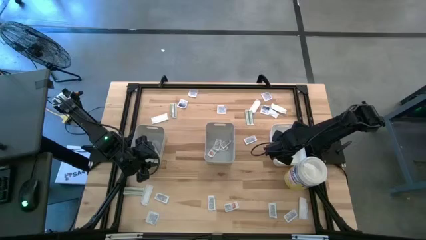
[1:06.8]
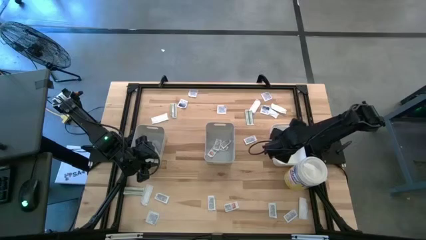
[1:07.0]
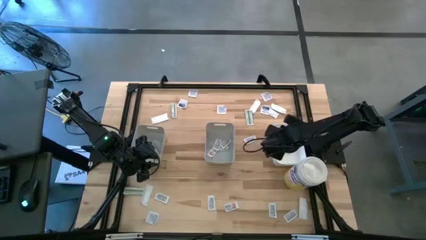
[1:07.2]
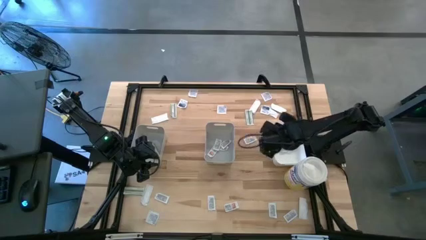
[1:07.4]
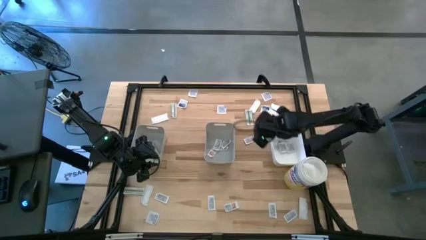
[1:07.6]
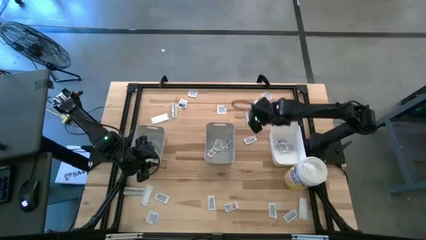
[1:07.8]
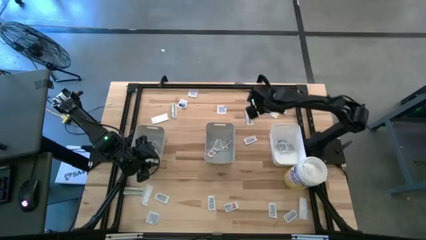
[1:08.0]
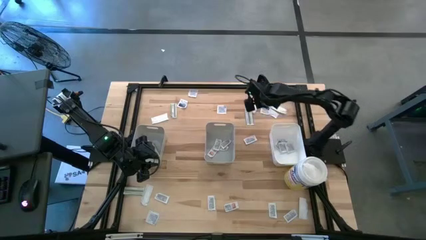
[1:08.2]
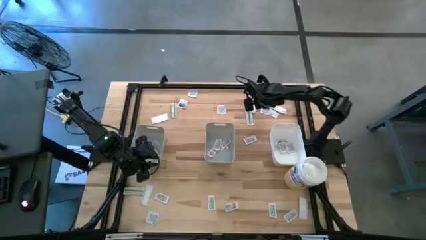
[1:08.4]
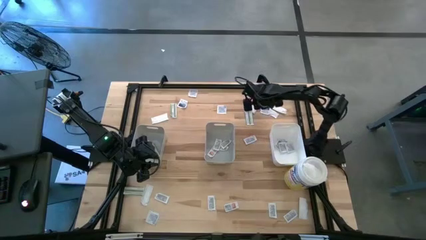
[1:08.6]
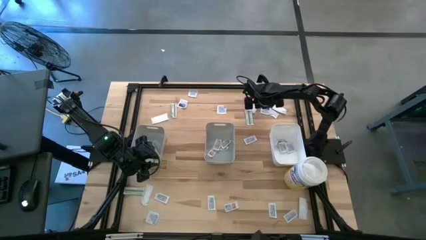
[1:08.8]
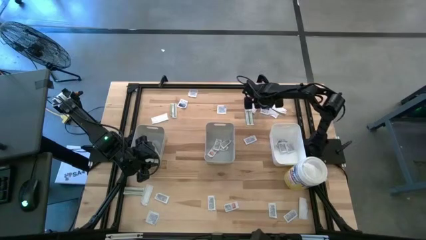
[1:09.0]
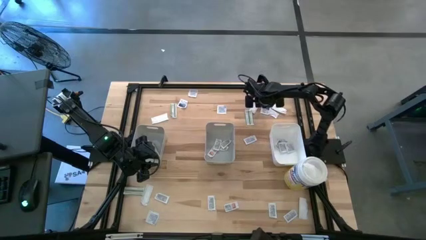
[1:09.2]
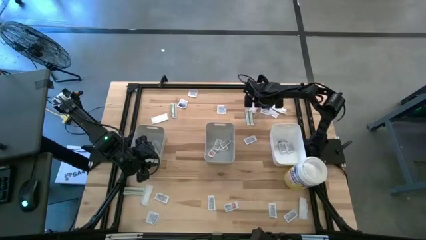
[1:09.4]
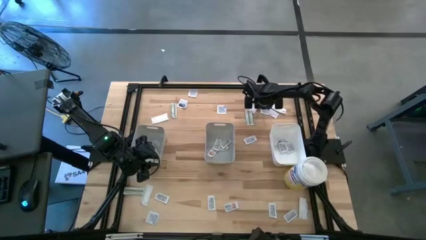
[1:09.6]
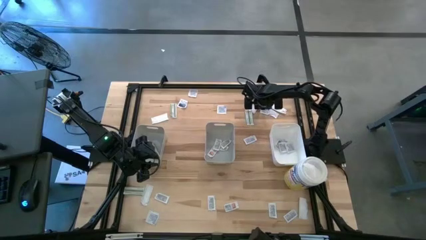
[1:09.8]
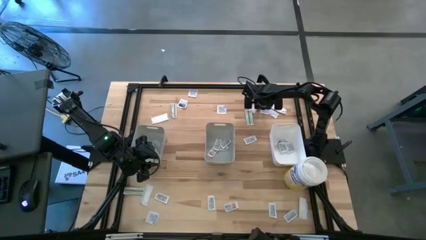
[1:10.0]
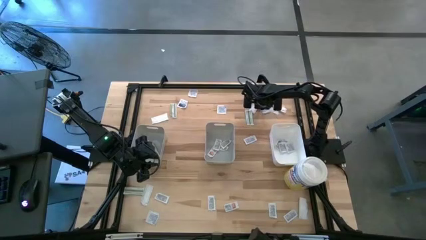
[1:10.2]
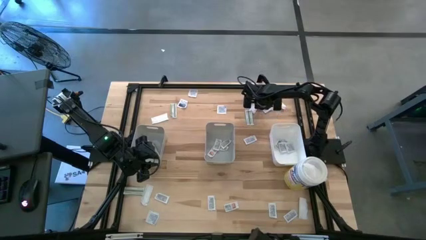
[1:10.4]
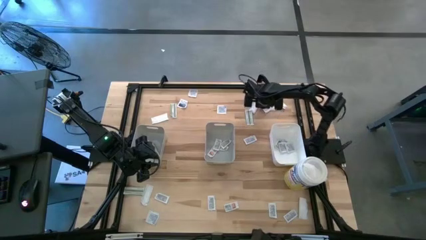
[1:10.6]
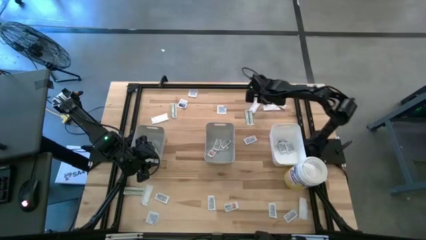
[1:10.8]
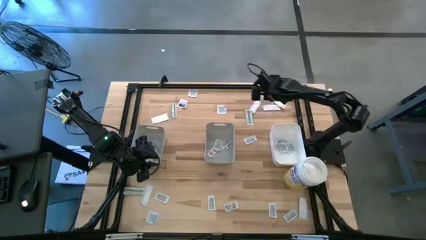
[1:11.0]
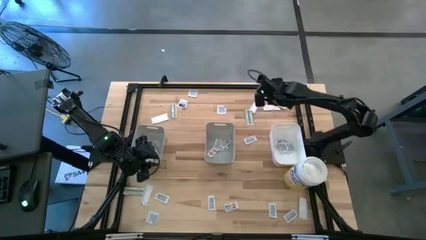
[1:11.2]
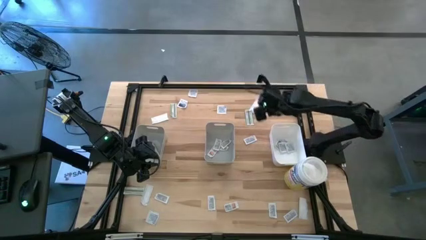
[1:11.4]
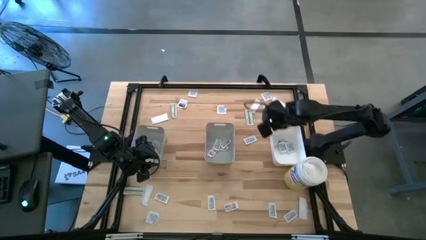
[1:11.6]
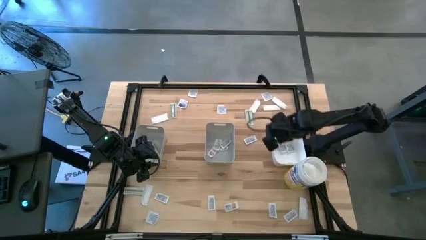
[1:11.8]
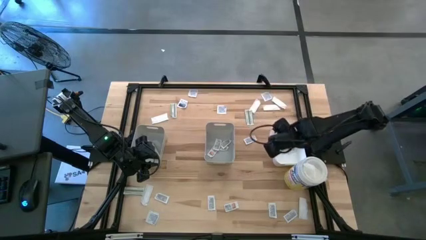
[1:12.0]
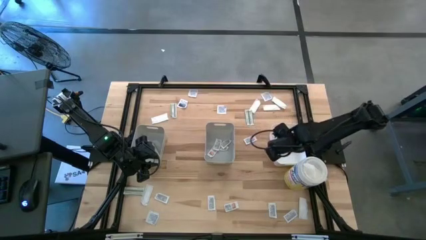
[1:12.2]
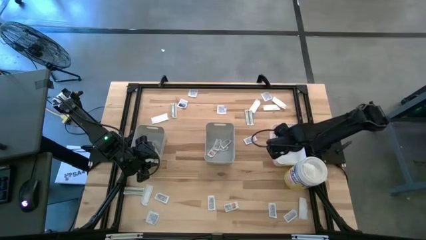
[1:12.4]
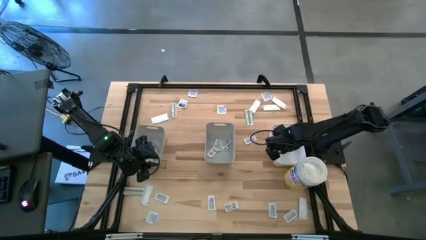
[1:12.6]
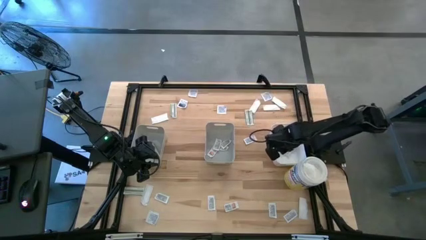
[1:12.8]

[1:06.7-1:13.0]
Task: Pick & Place First Aid Supplies
Put the alcohol pad into the white bin

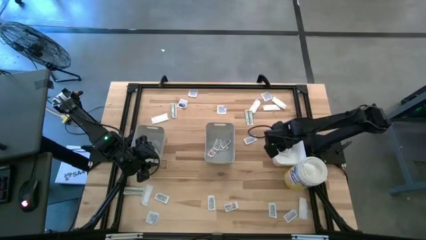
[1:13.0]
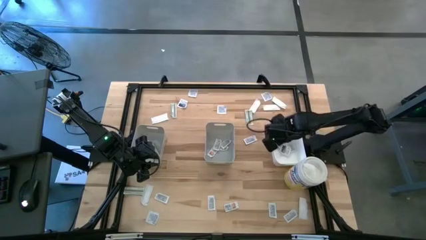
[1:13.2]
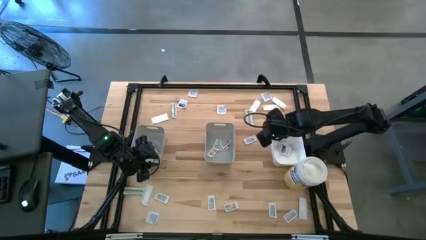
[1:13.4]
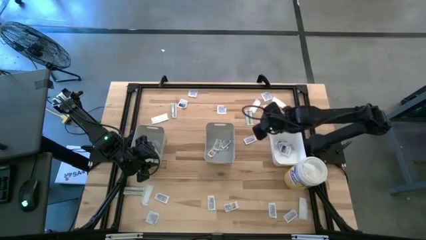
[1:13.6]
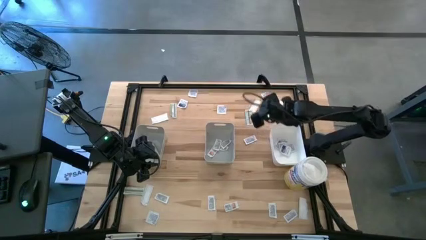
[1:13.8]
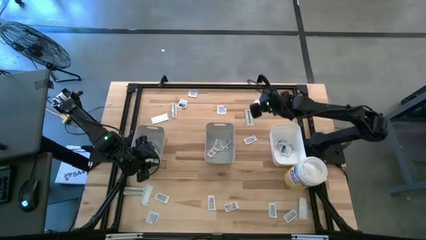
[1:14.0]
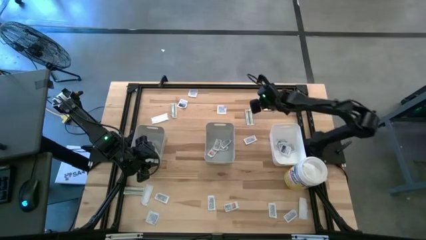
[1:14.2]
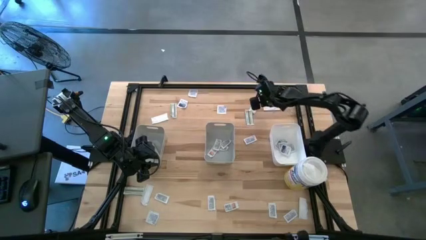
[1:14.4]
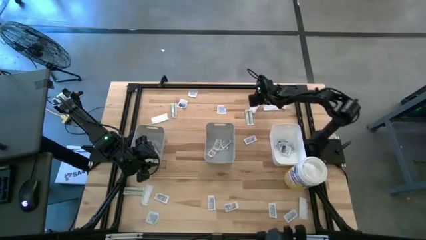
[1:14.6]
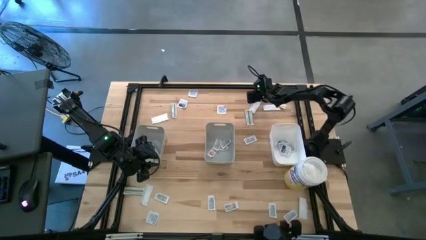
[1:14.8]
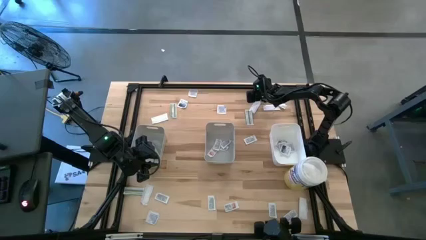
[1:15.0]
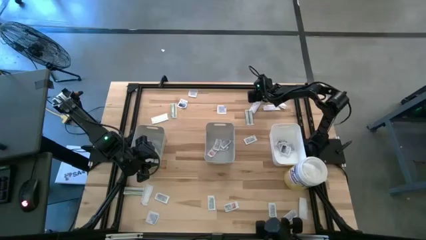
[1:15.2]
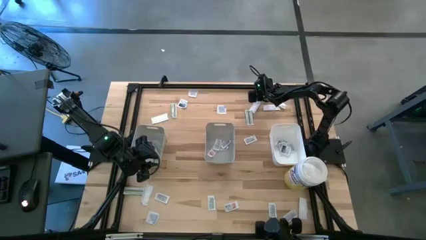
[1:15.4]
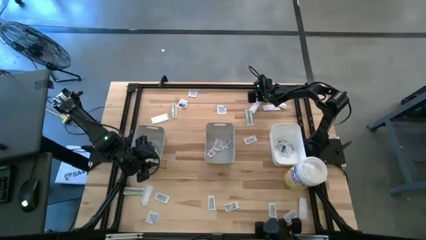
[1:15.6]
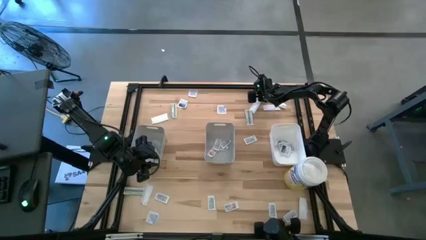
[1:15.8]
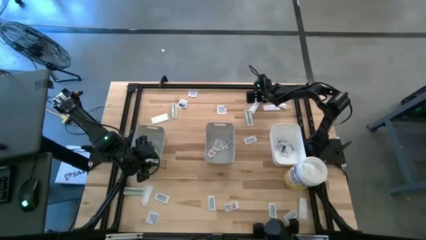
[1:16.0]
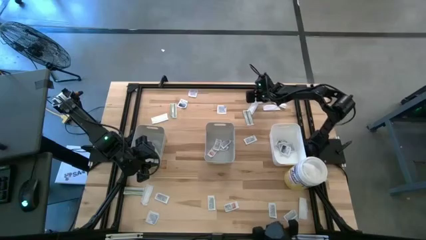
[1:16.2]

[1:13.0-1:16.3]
Put the alcohol pad into the white bin

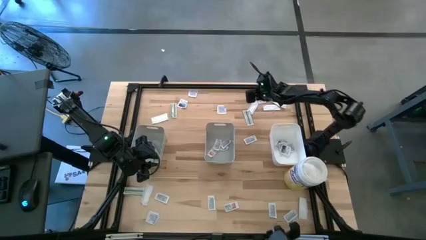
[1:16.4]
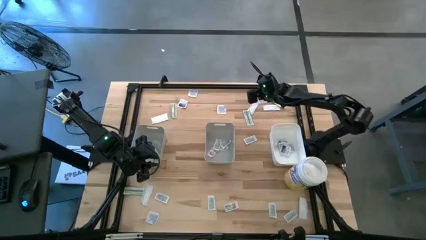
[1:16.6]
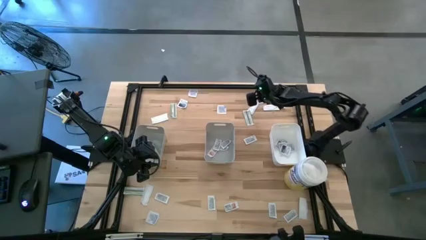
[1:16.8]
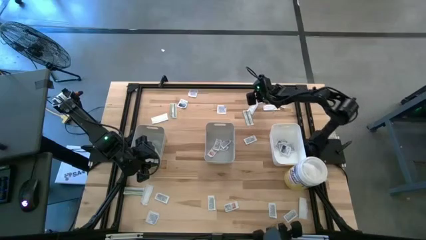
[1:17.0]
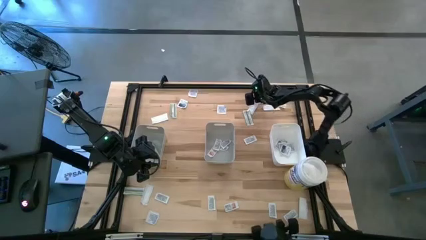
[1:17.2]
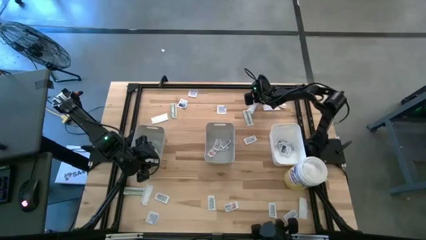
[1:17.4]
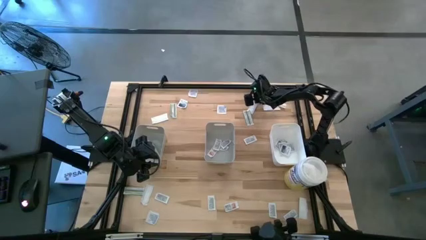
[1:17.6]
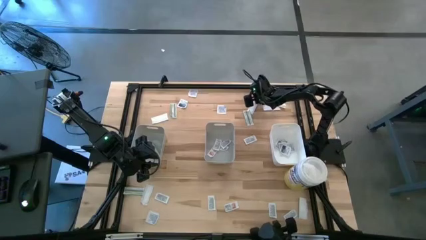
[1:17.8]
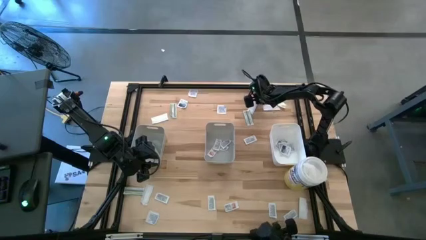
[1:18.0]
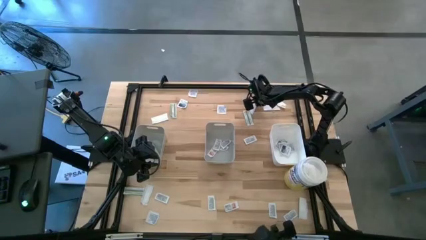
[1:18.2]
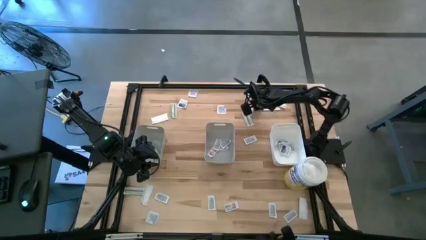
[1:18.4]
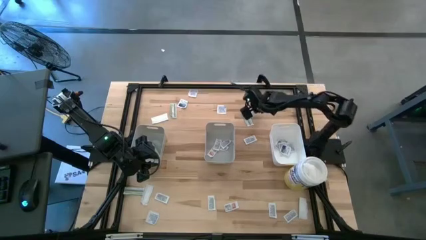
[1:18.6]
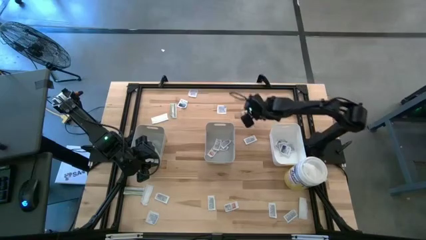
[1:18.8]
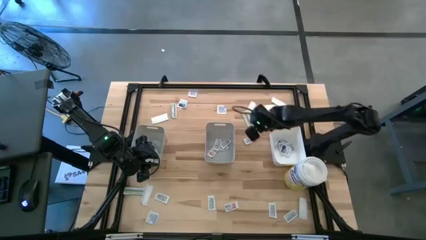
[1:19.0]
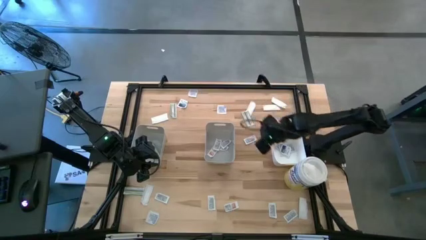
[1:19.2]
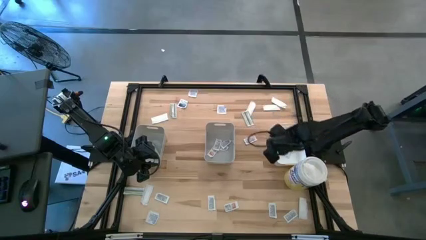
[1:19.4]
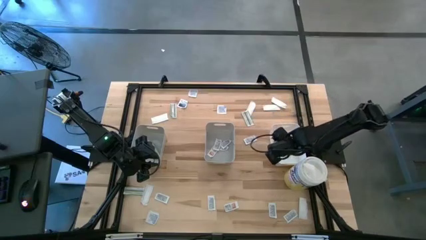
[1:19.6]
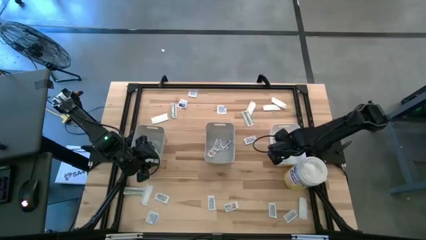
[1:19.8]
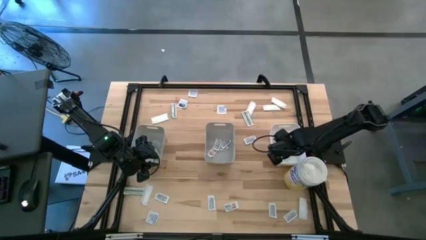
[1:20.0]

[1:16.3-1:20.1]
Put the alcohol pad into the white bin

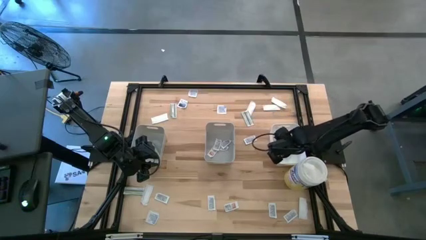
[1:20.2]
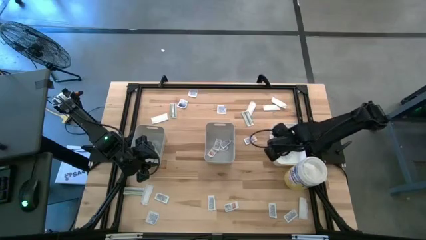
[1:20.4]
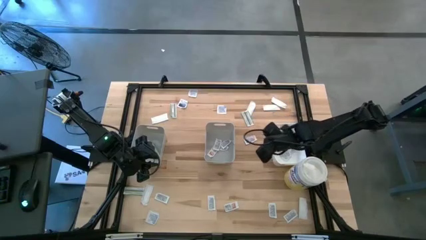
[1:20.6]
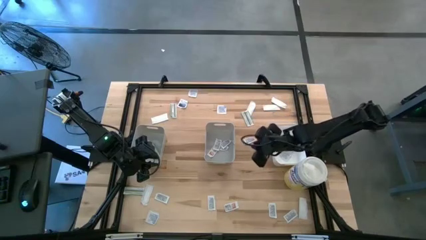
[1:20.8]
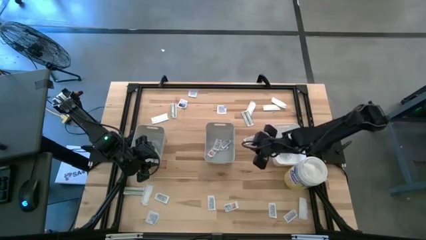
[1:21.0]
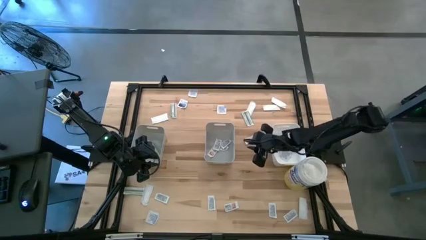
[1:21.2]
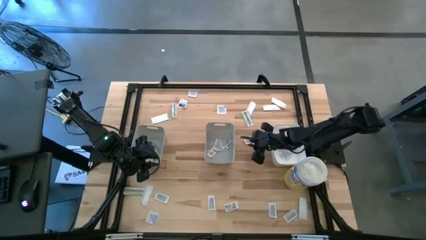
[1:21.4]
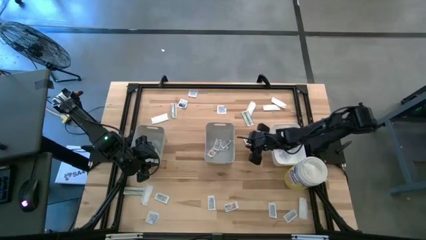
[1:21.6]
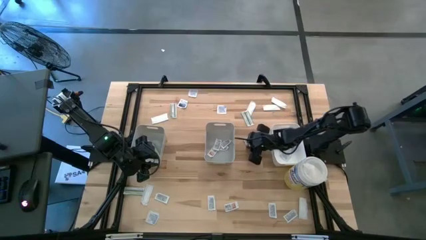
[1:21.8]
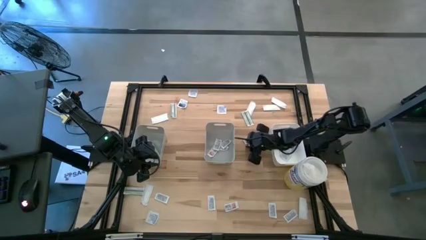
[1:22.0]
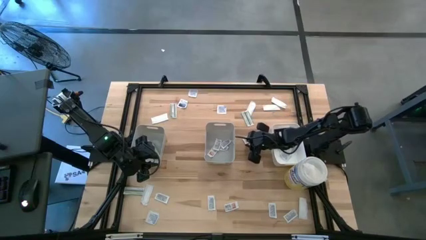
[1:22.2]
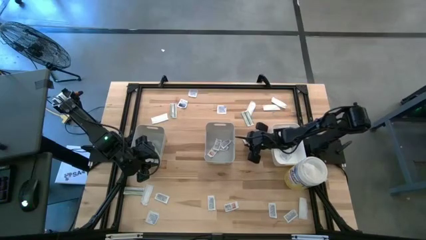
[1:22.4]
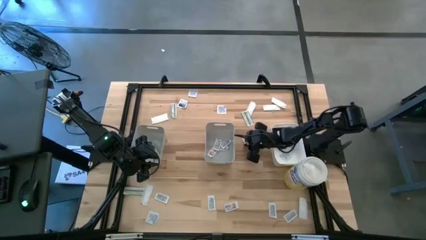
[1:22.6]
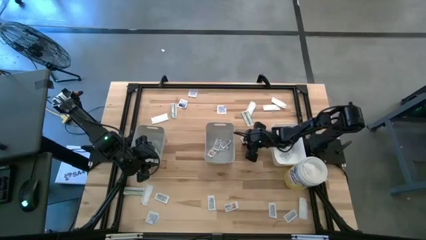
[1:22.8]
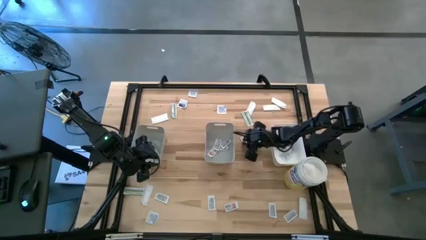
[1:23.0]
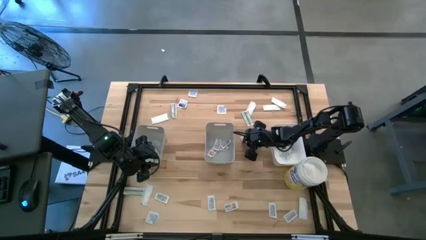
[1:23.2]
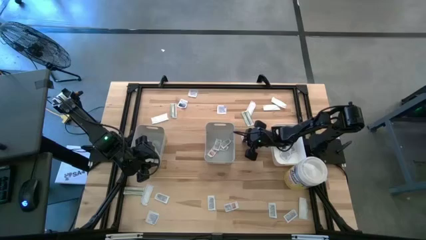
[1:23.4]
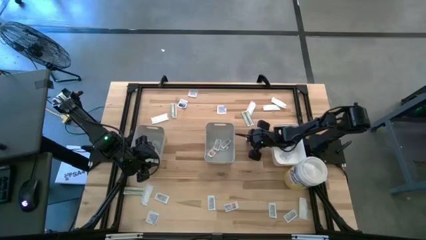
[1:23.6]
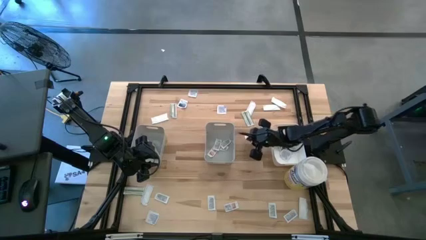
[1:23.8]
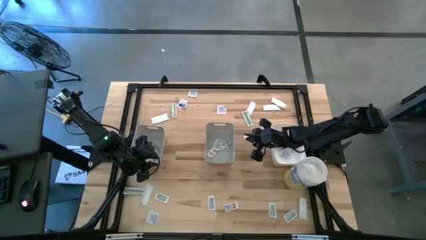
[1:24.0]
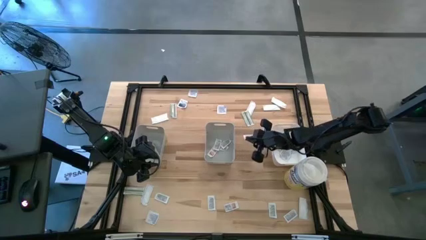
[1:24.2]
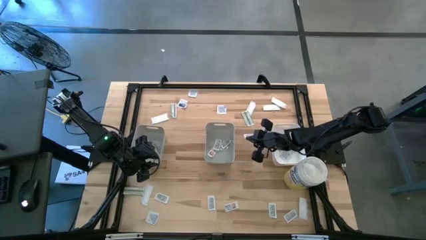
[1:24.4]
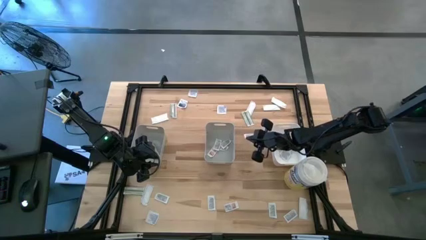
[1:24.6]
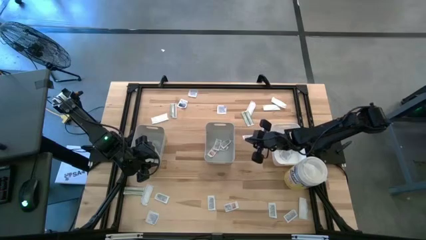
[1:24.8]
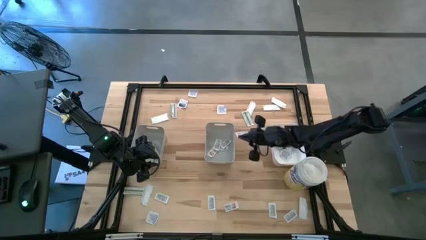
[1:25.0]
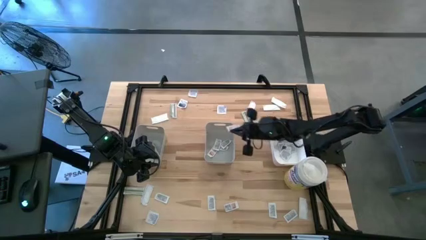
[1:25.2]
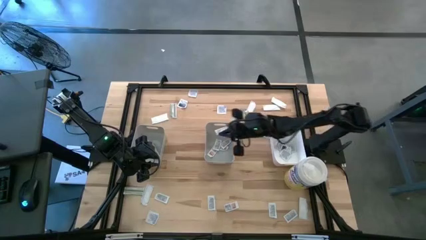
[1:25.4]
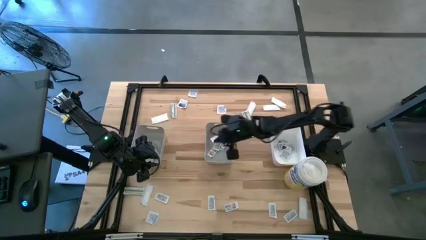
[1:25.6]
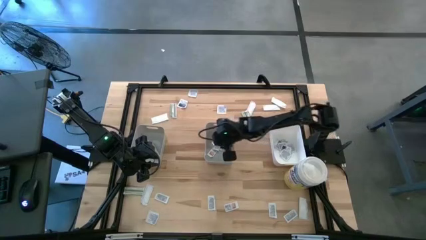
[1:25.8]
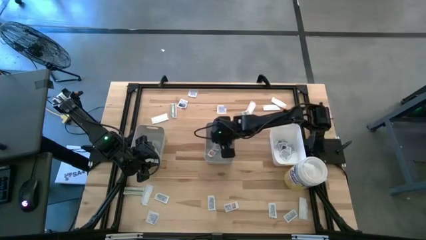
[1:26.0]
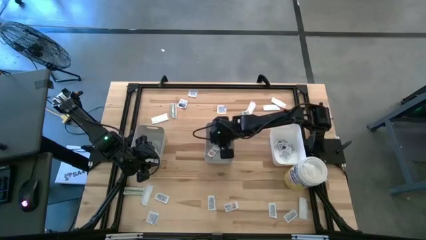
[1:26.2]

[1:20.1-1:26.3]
Put the ointment pack into the right gray bin
